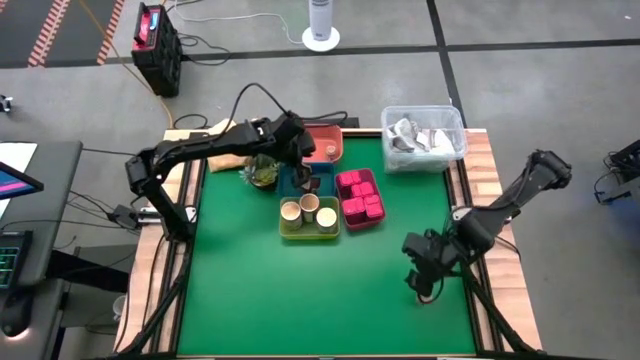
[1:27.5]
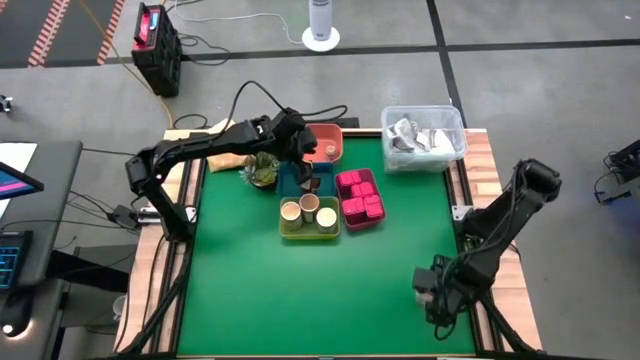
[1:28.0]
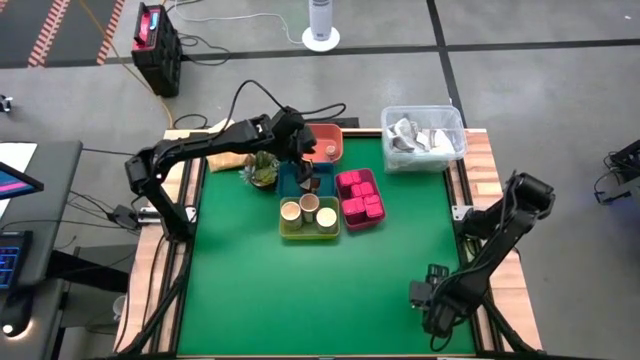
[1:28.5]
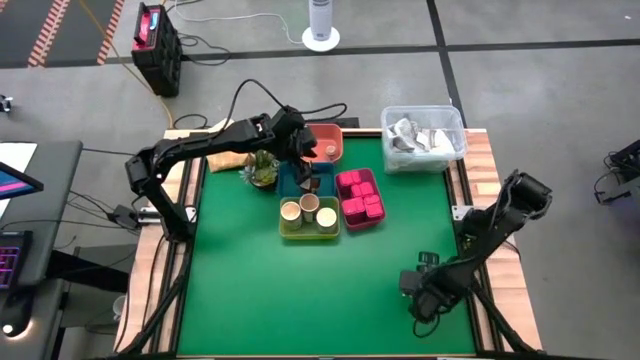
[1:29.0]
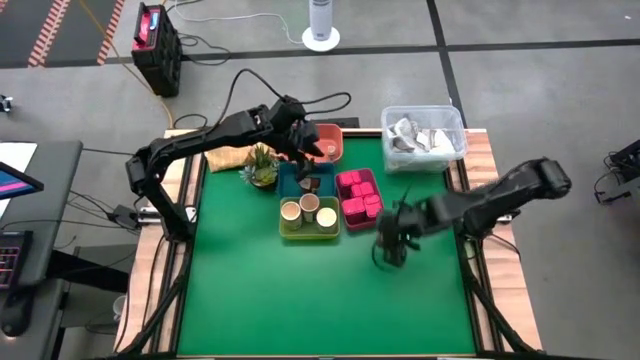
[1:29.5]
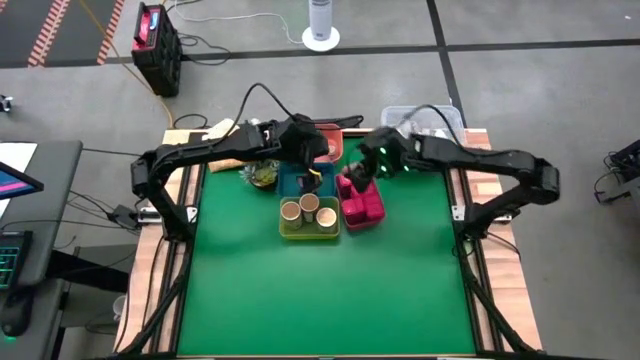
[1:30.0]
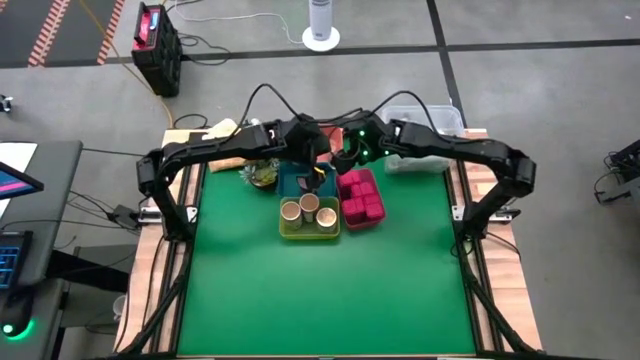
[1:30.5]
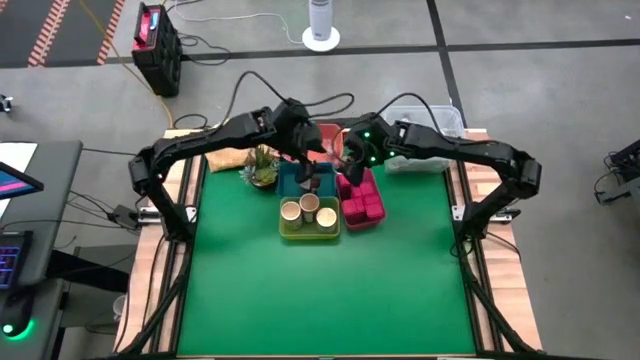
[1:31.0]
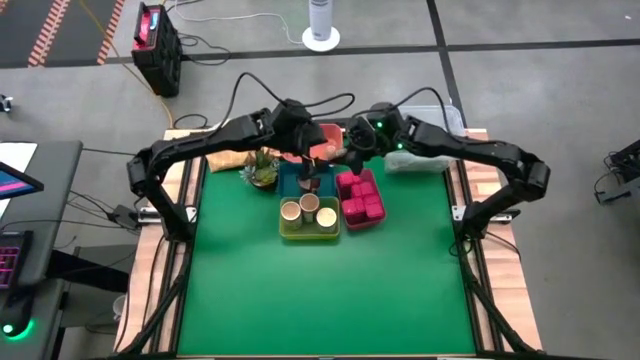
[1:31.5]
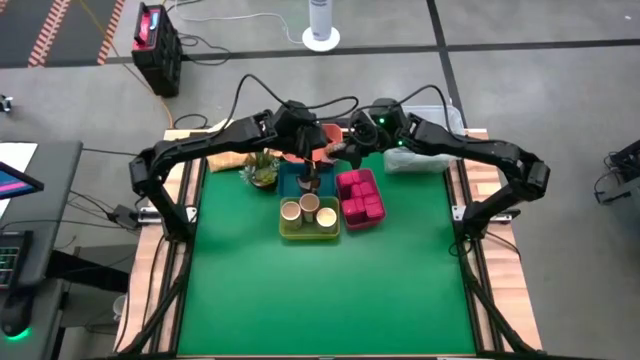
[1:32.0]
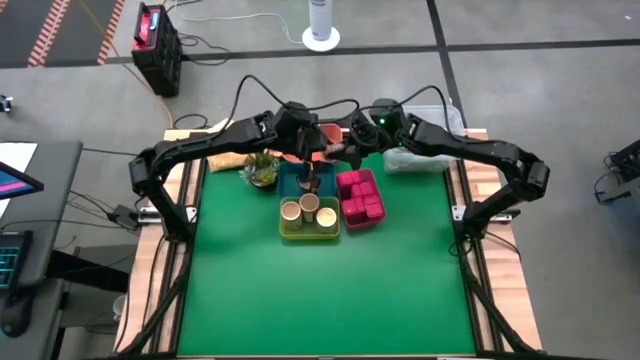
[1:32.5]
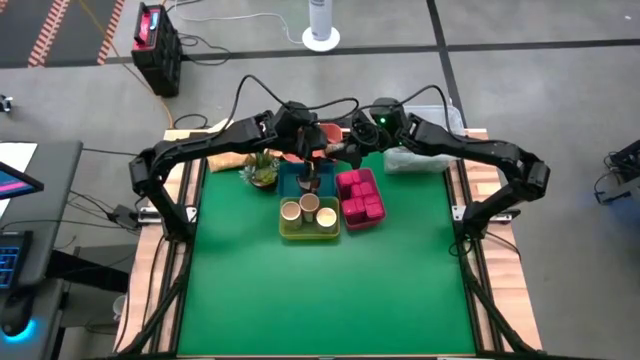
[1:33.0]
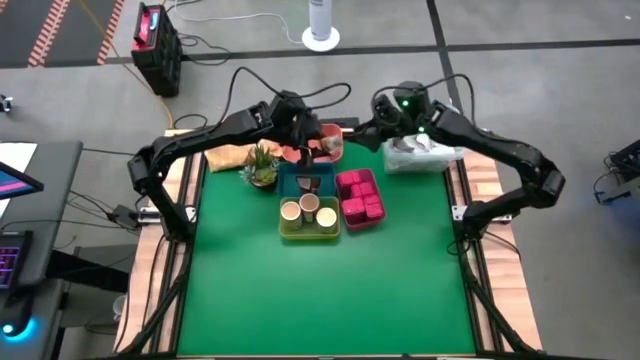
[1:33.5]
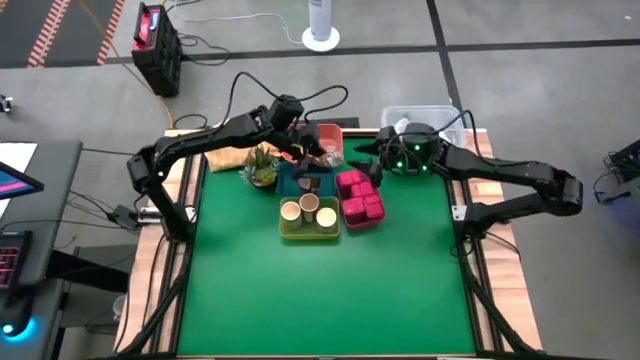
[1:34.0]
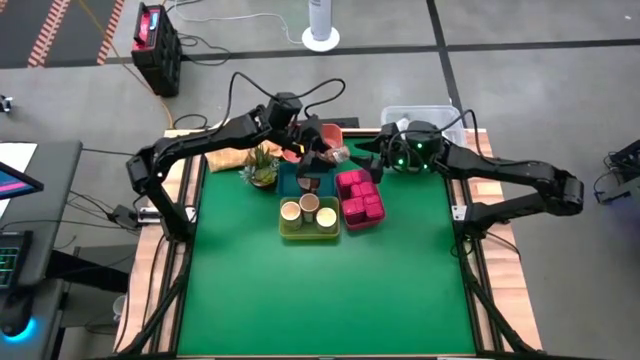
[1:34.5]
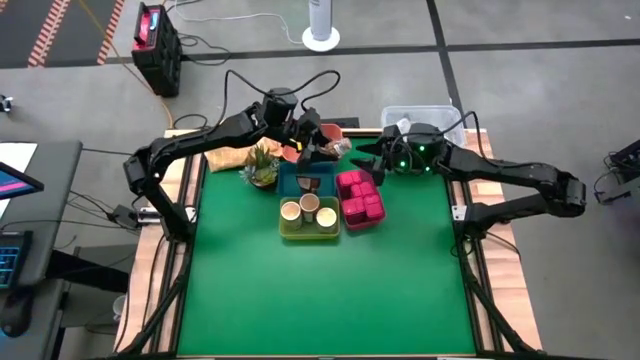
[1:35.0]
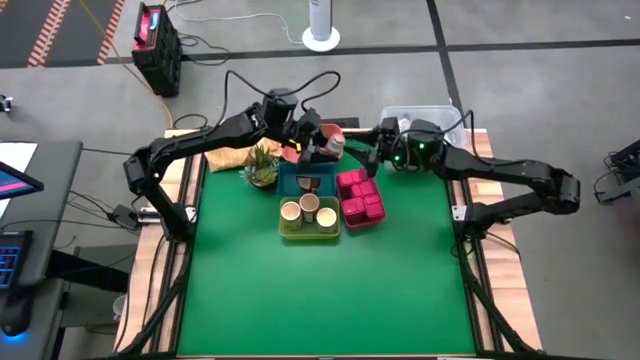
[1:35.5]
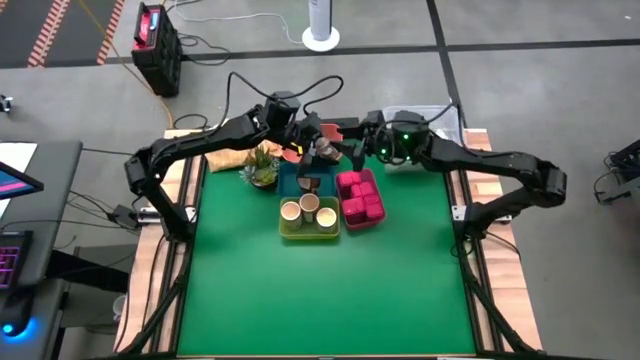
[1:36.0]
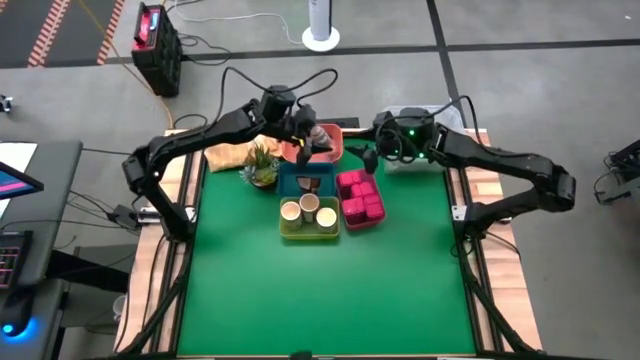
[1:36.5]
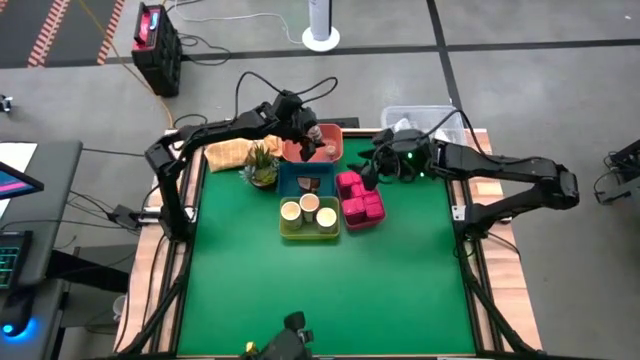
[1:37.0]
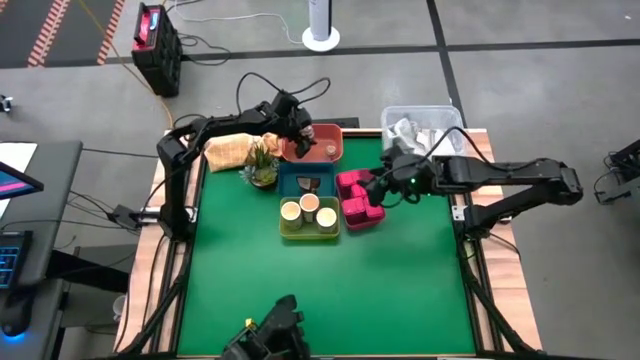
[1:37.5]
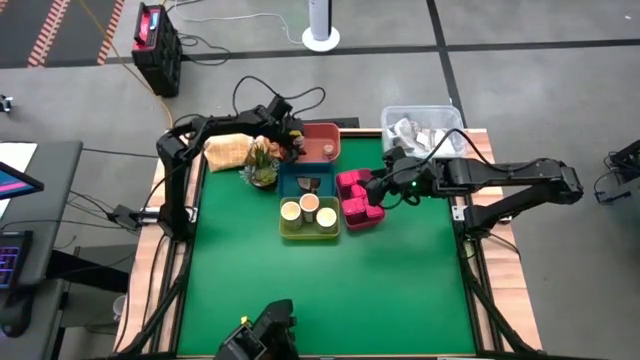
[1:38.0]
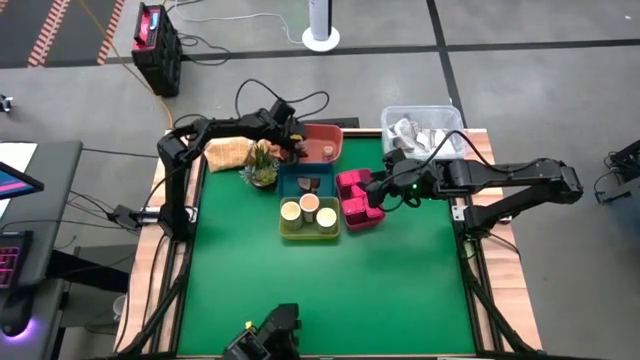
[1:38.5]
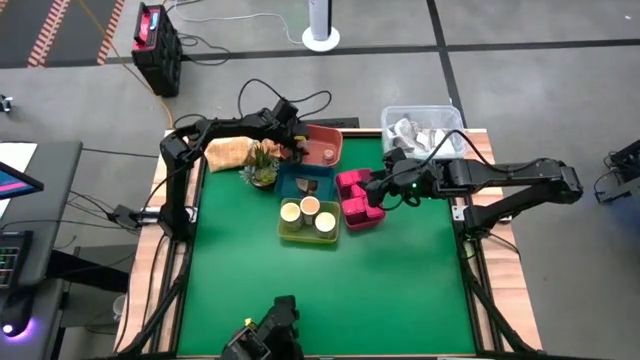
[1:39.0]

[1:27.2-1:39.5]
Task: Sort spices by type
Put the right brown seasoning bottle into the orange bin

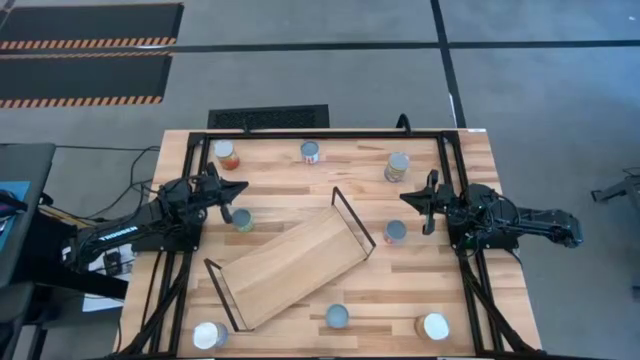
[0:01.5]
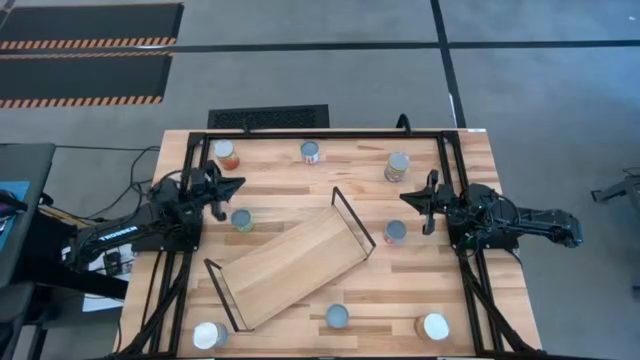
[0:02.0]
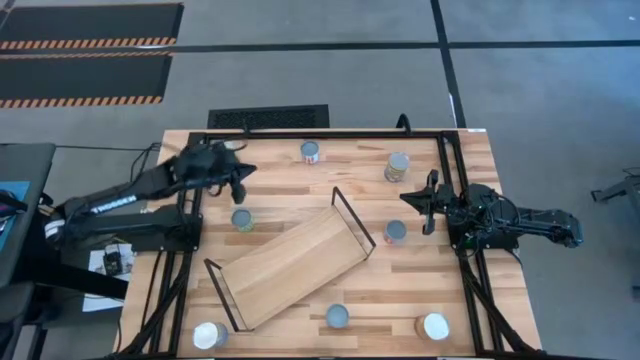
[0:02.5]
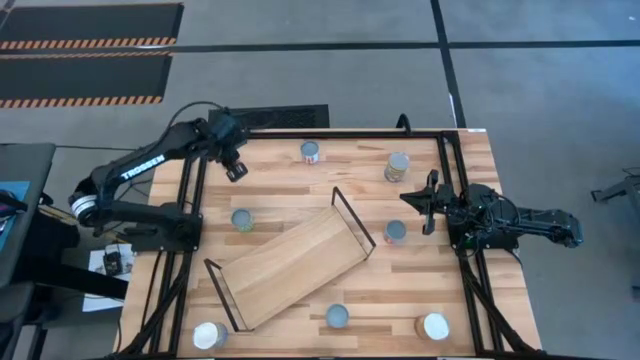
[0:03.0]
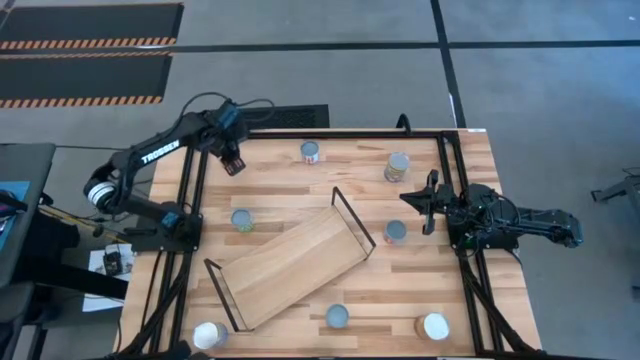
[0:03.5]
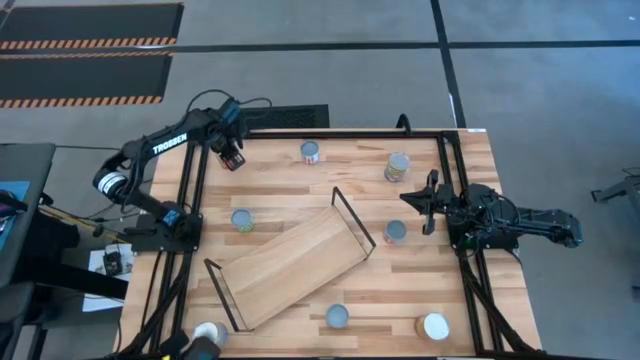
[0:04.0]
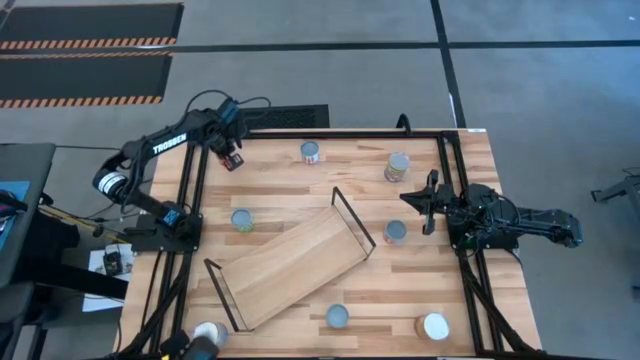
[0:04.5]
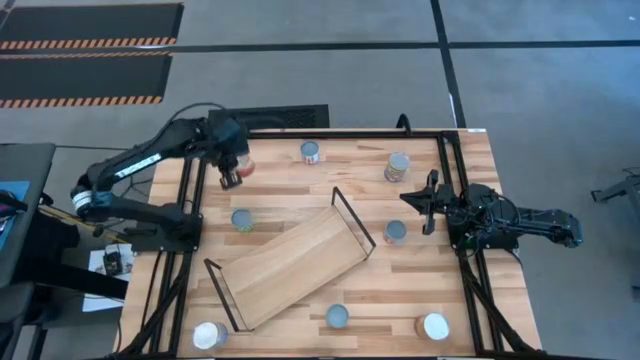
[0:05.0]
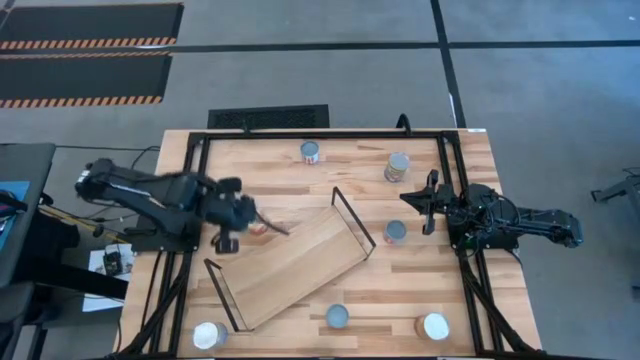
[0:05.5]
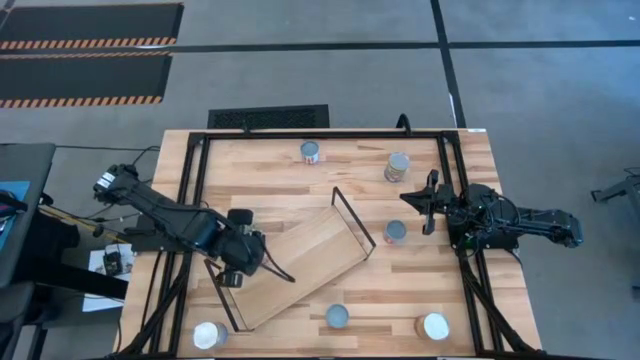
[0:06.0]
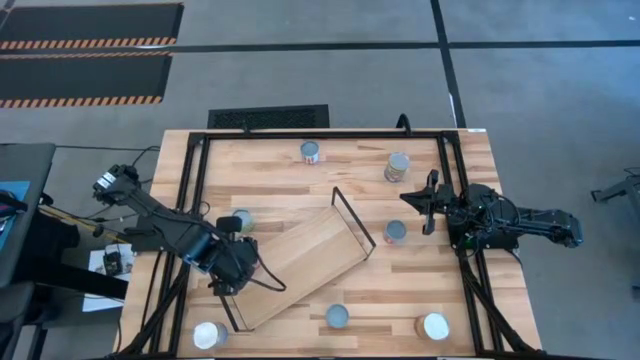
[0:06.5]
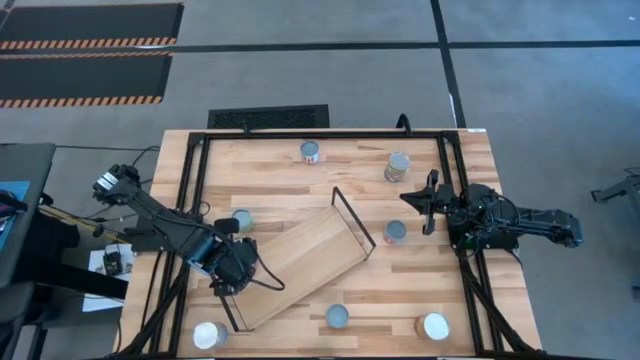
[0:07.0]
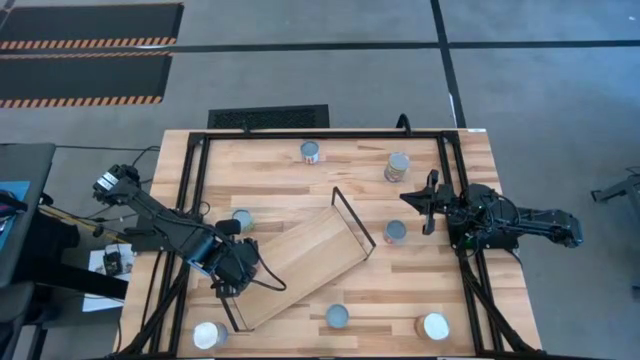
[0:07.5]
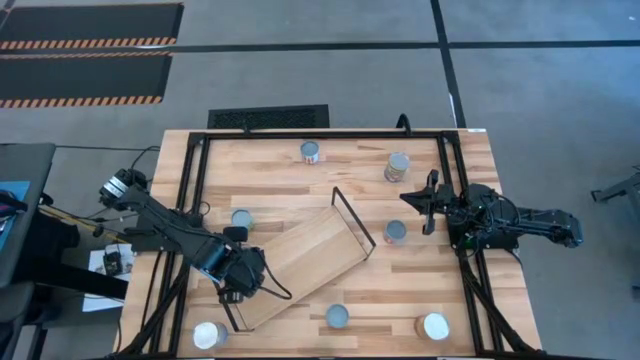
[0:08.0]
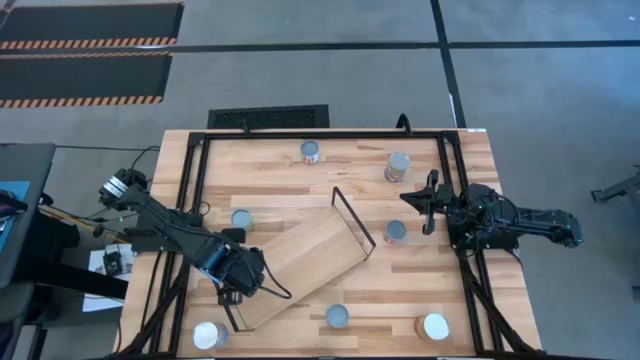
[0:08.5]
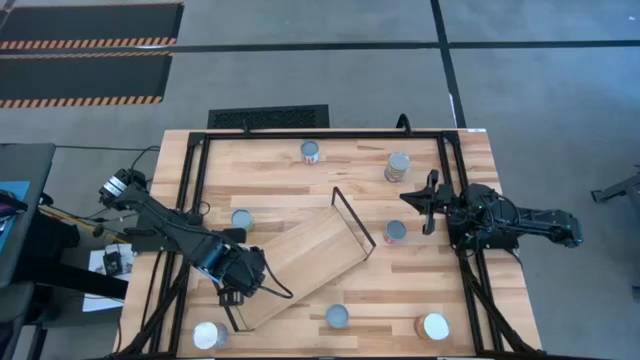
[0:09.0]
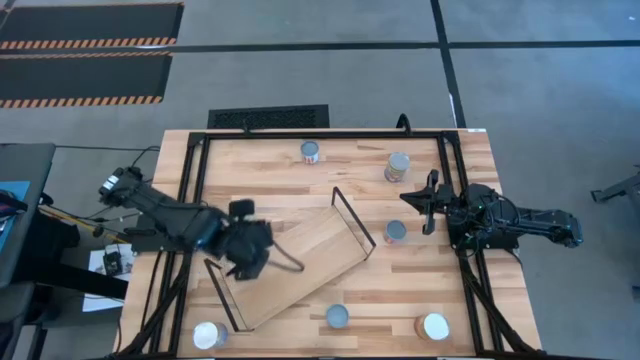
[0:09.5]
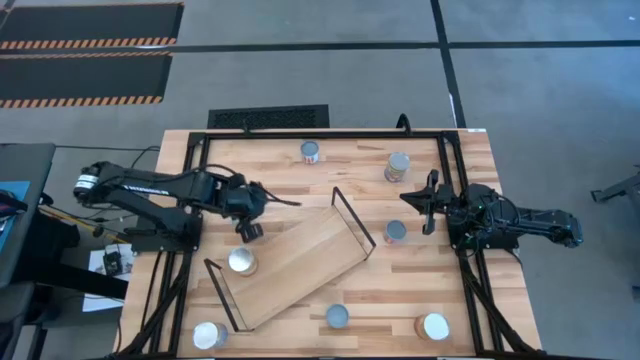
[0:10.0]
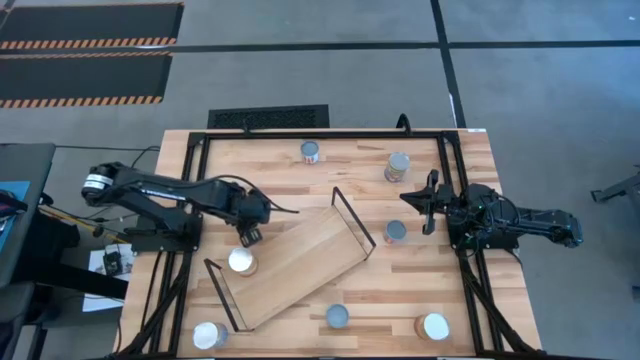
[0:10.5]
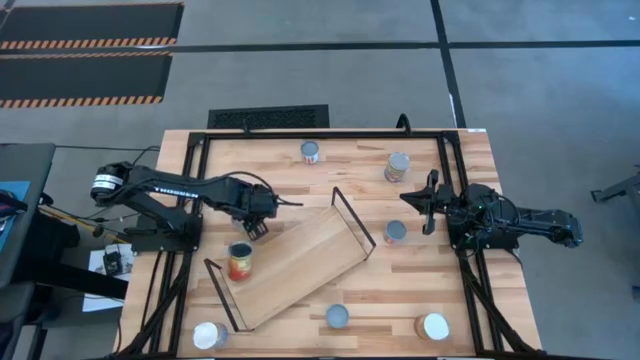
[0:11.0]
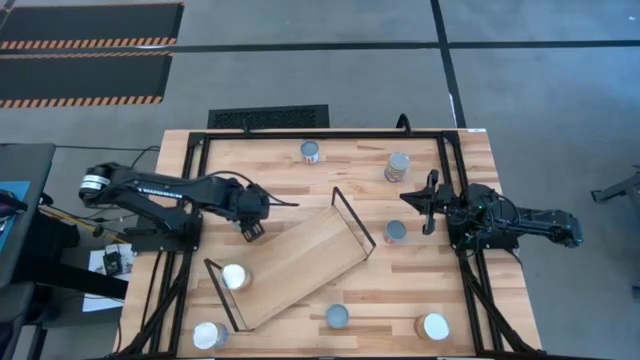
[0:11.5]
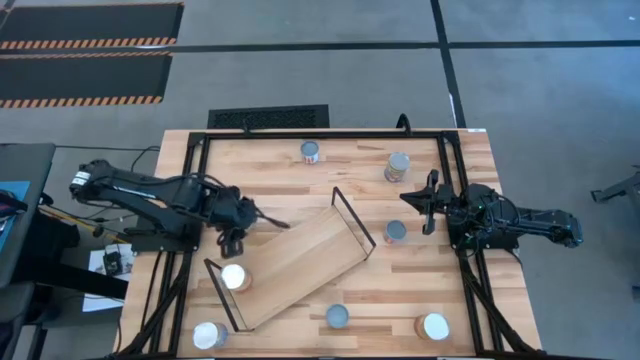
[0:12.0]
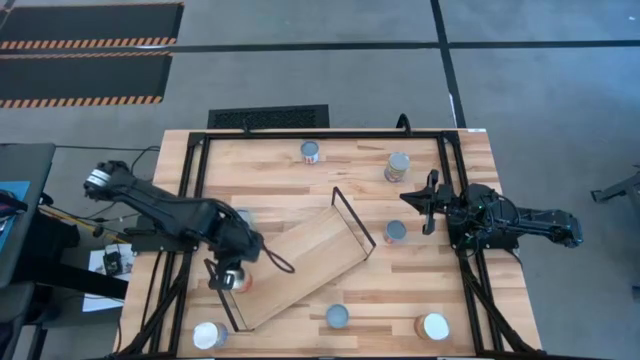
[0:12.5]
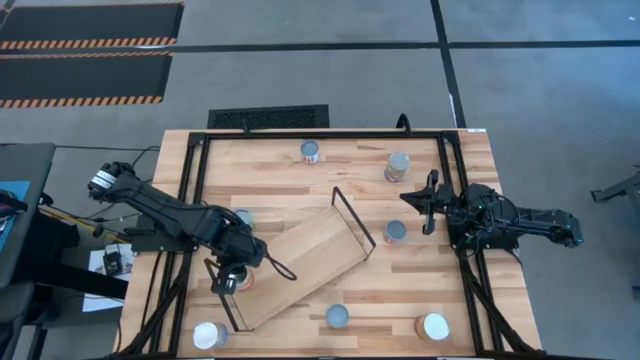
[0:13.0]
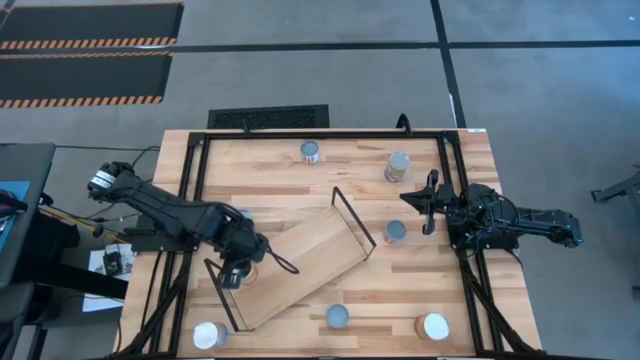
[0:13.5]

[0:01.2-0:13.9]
Task: Pick and place cans onto a shelf
Put the top canned corn on the shelf
